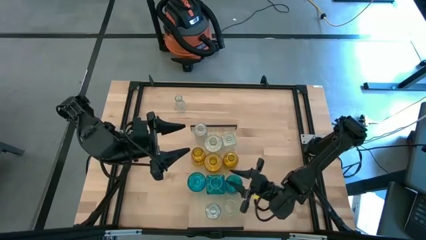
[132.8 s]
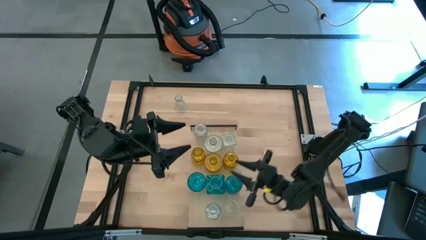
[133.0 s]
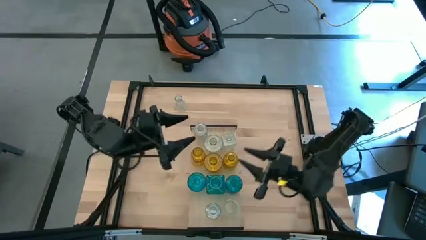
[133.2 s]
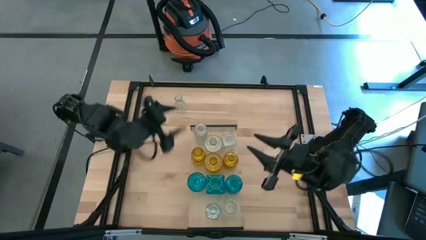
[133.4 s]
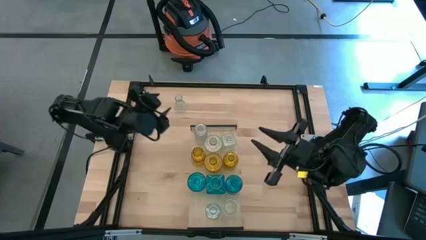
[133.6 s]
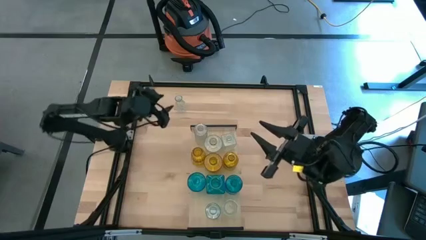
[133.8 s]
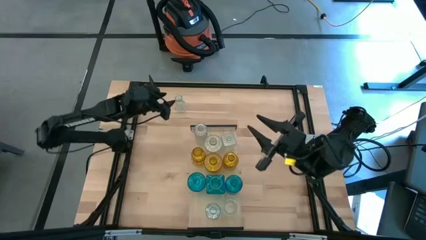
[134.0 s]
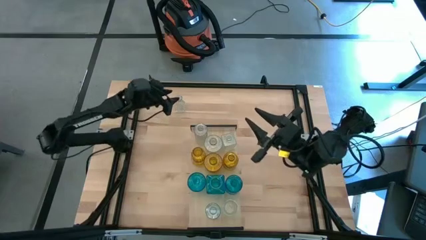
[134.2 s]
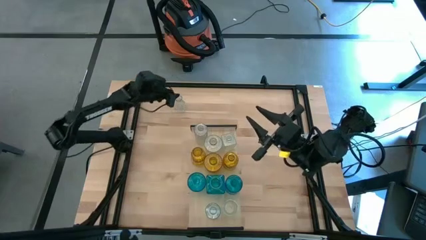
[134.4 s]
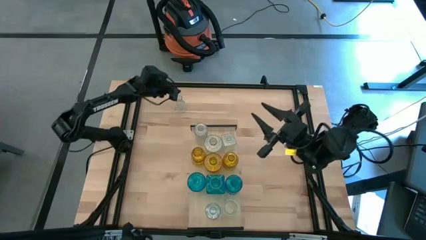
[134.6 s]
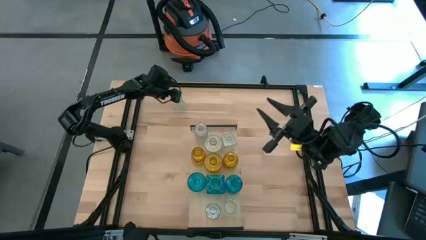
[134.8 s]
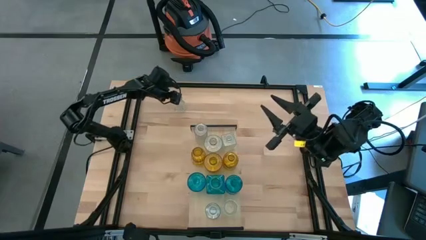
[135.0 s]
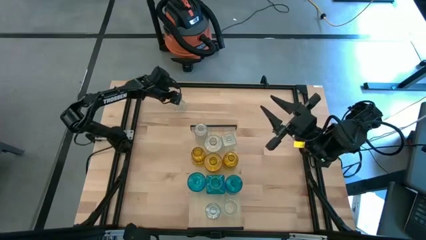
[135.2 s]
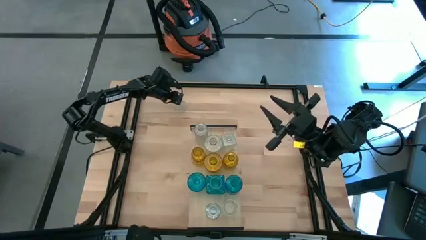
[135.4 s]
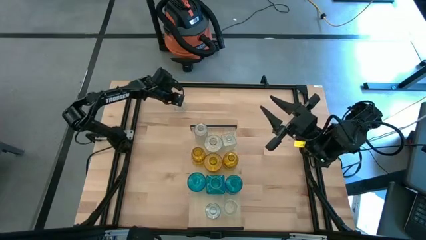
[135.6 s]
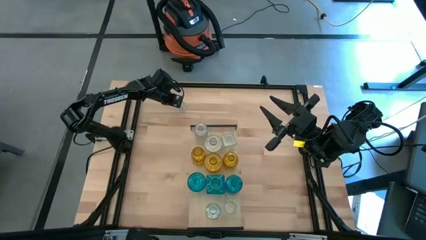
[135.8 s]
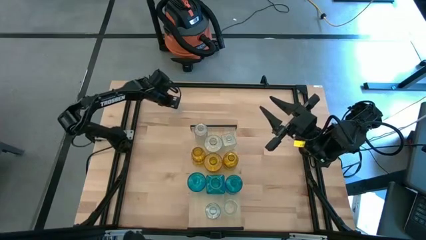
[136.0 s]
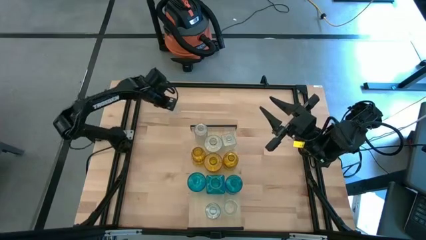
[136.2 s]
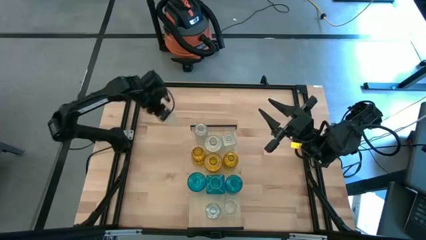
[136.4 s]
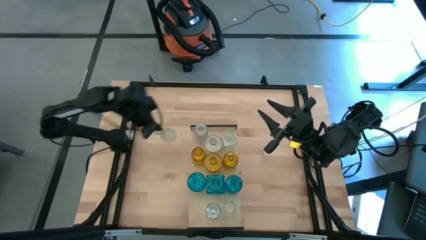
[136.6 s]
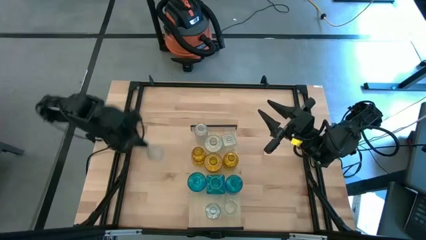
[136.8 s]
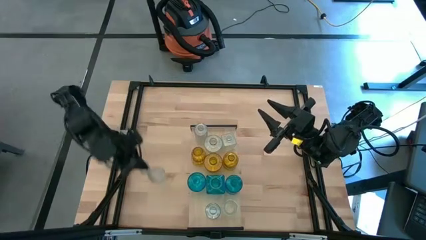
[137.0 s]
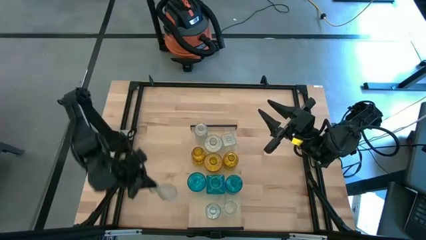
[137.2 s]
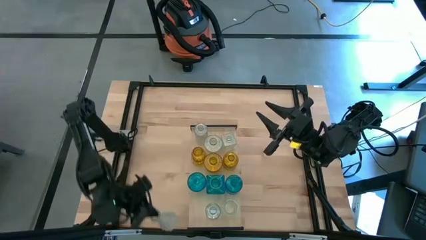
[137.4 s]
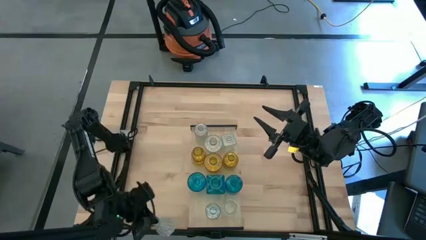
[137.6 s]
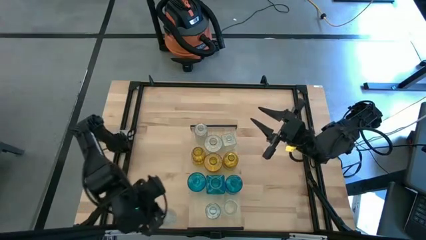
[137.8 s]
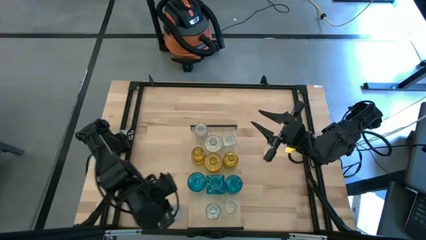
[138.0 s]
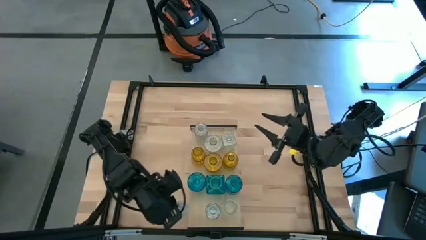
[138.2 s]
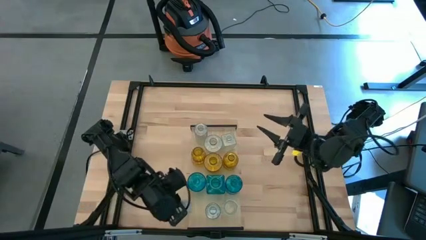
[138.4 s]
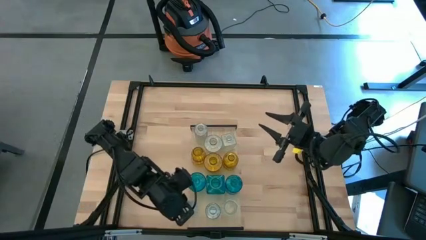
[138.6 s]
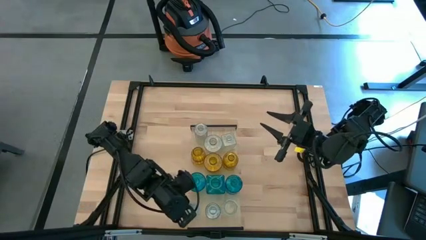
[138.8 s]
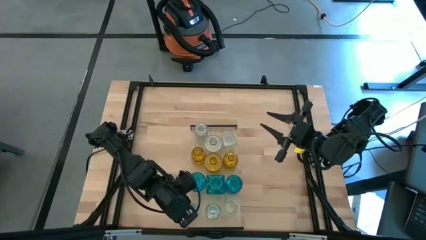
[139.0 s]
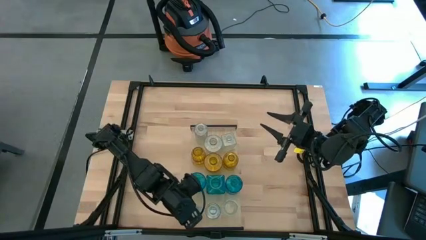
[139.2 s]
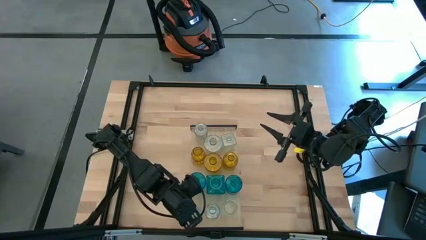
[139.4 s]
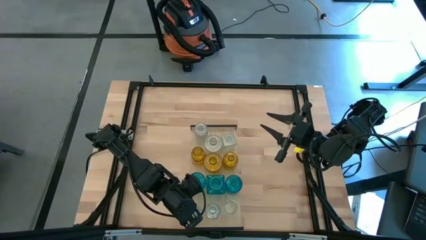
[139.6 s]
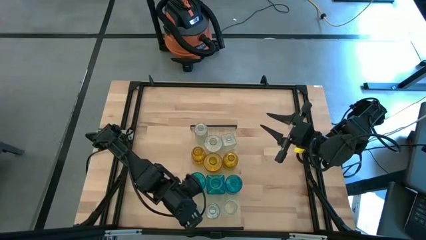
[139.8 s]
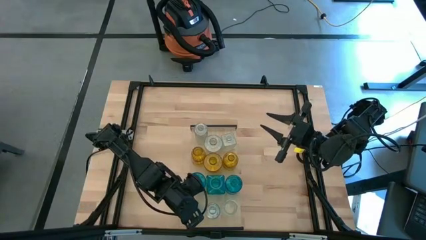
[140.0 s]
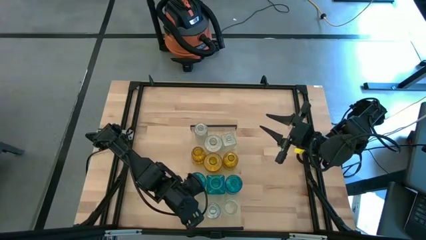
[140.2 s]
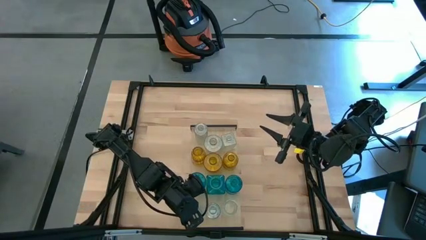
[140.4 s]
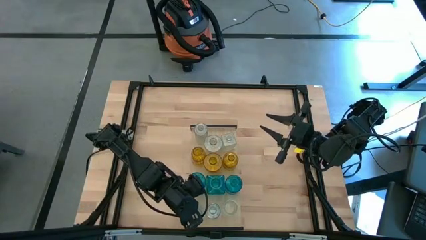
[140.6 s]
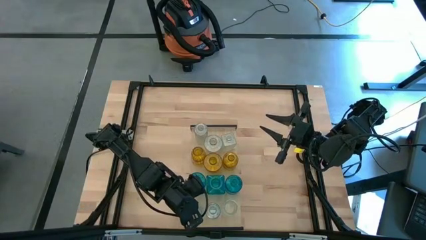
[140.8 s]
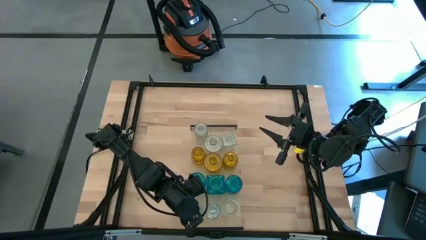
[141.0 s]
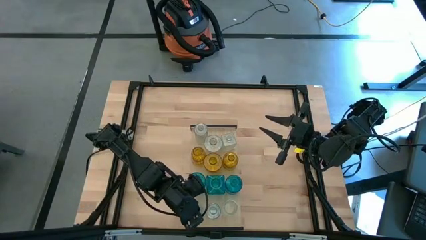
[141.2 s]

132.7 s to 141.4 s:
Task: sort vases onto shelf
Put the transparent vase on the shelf aligned with the other transparent vases

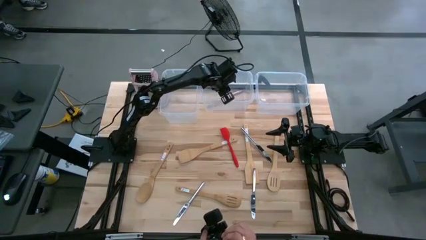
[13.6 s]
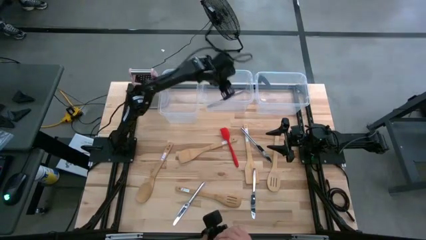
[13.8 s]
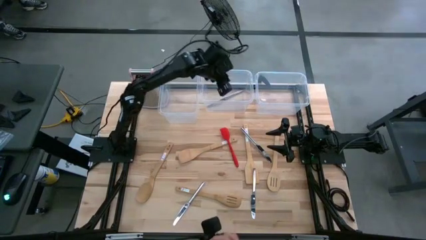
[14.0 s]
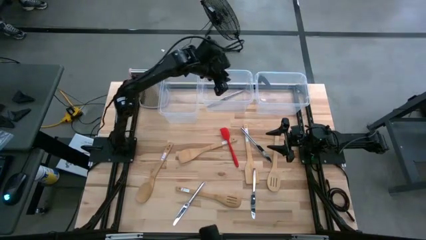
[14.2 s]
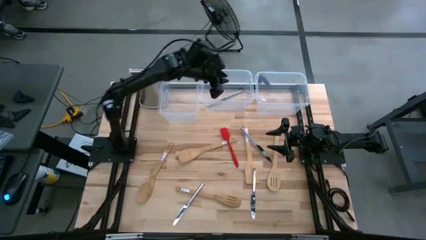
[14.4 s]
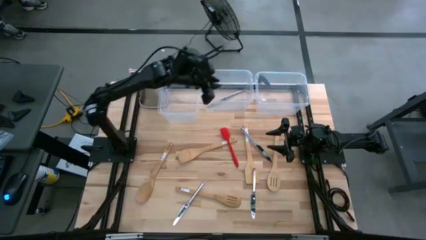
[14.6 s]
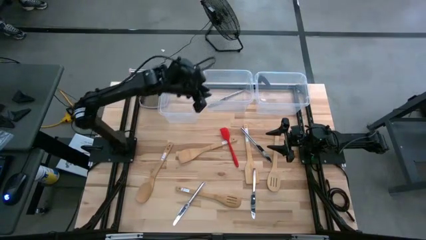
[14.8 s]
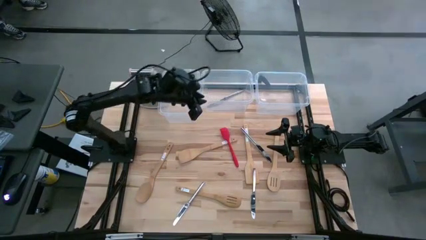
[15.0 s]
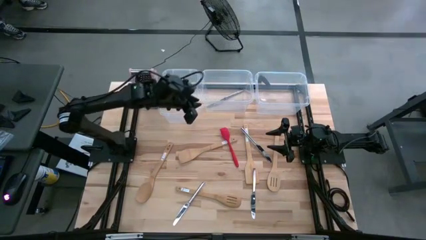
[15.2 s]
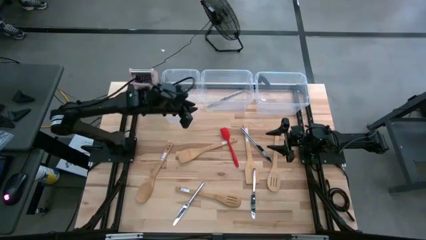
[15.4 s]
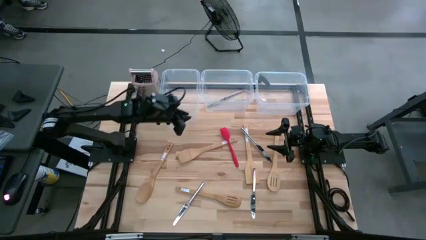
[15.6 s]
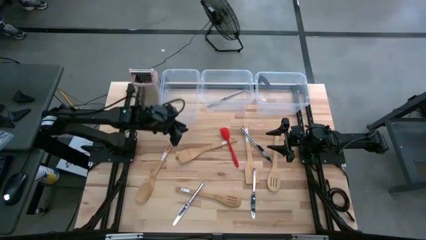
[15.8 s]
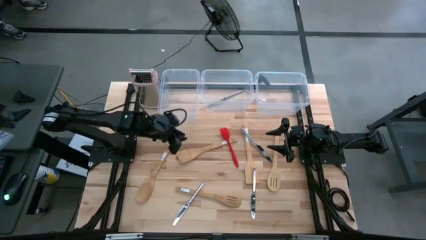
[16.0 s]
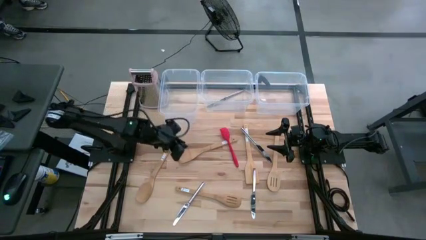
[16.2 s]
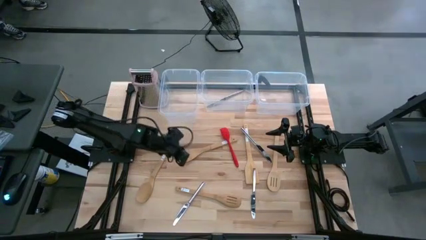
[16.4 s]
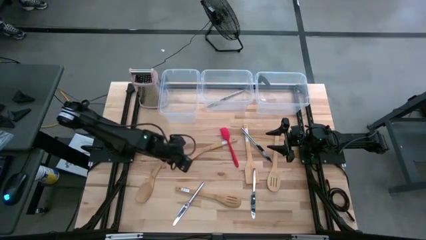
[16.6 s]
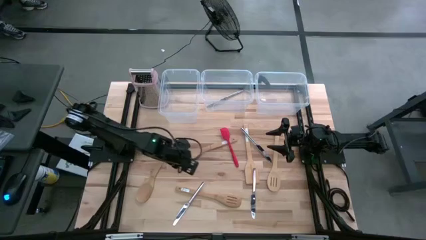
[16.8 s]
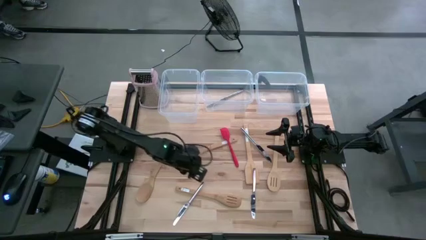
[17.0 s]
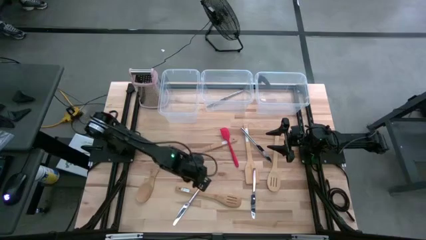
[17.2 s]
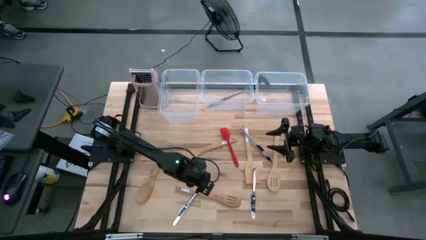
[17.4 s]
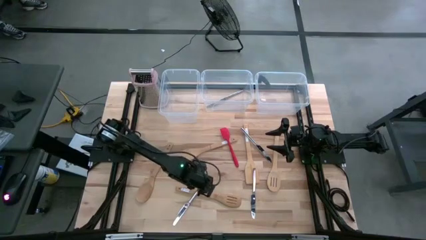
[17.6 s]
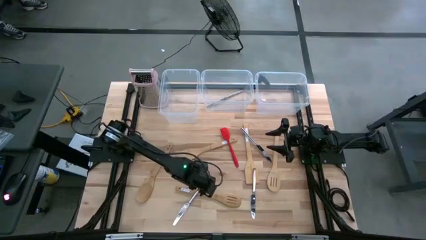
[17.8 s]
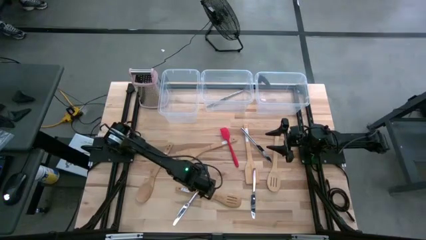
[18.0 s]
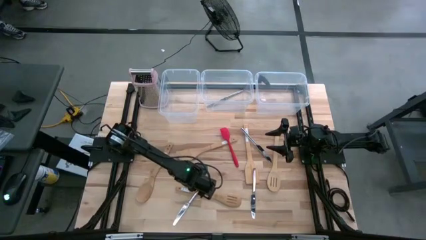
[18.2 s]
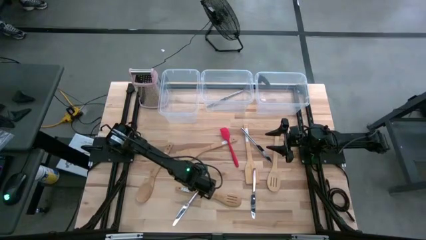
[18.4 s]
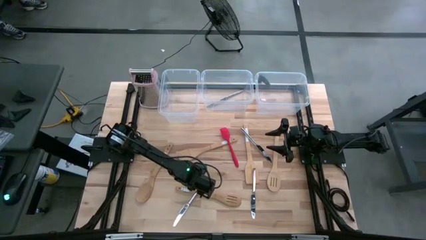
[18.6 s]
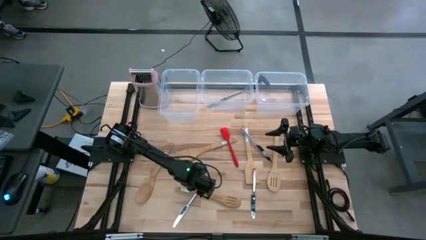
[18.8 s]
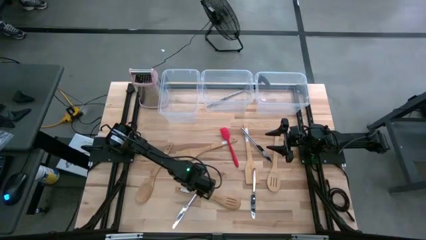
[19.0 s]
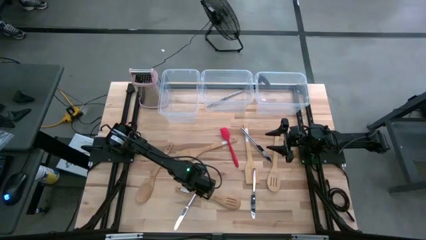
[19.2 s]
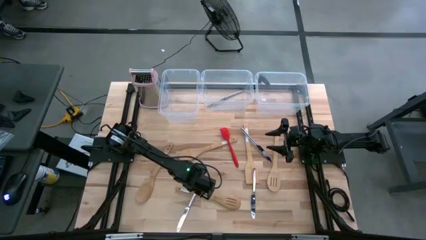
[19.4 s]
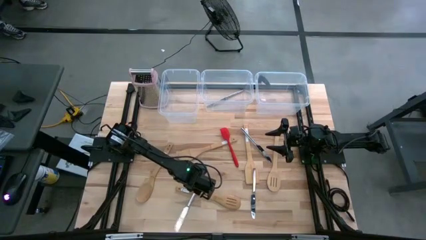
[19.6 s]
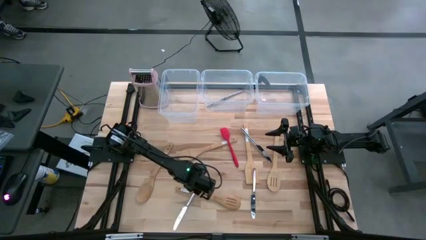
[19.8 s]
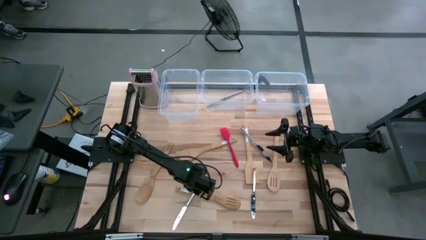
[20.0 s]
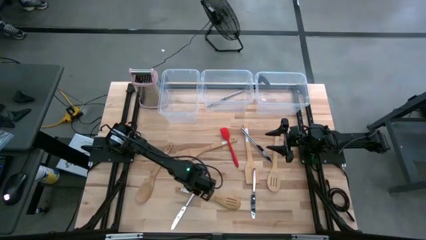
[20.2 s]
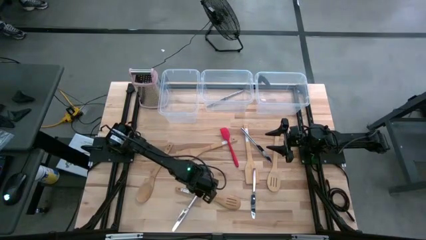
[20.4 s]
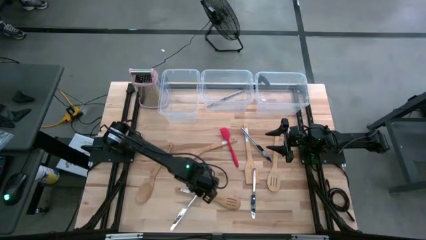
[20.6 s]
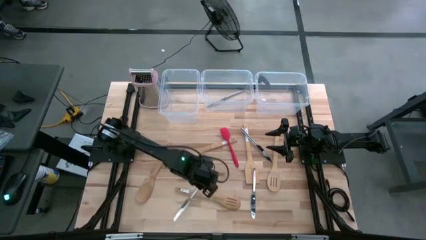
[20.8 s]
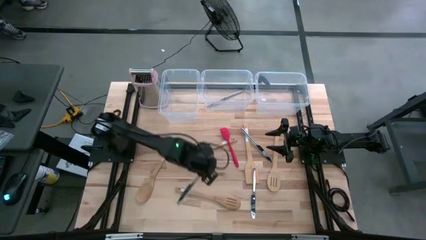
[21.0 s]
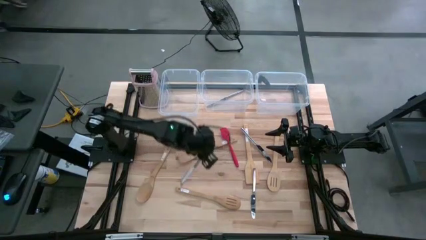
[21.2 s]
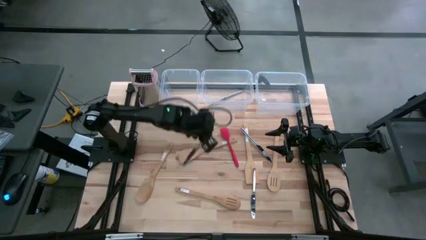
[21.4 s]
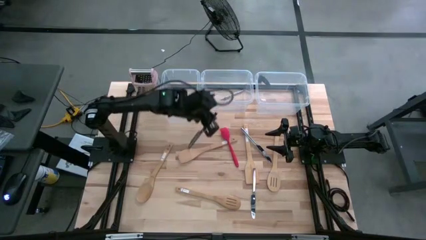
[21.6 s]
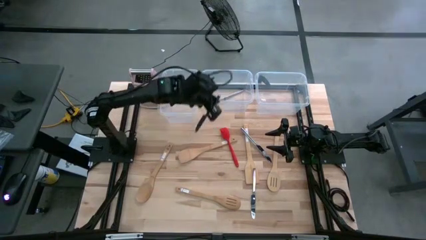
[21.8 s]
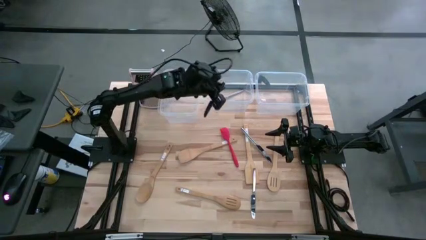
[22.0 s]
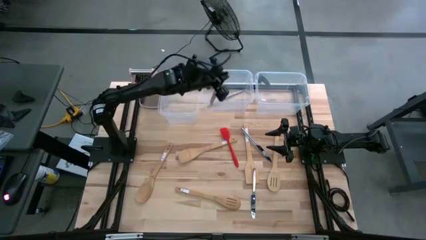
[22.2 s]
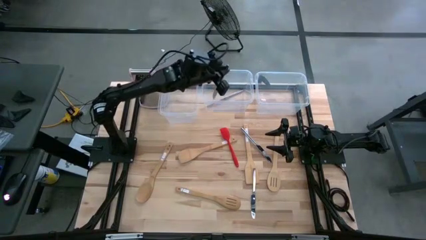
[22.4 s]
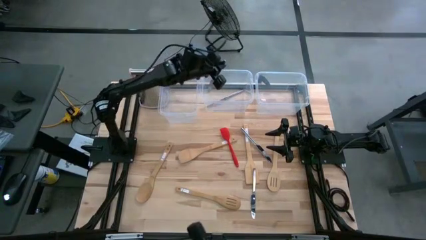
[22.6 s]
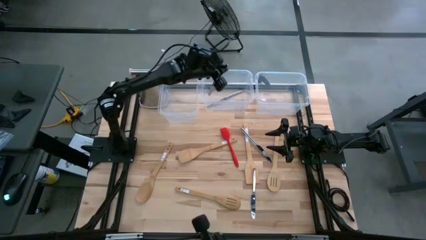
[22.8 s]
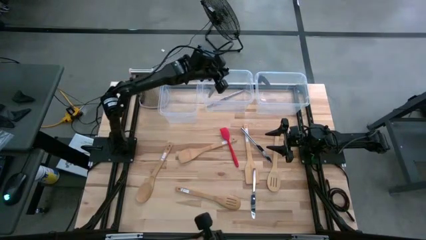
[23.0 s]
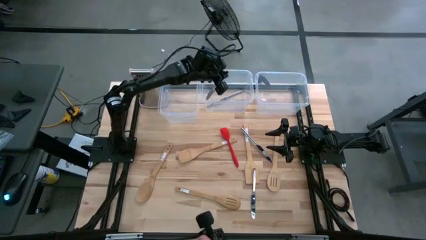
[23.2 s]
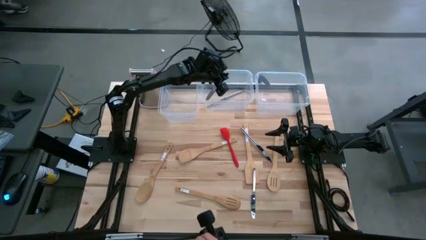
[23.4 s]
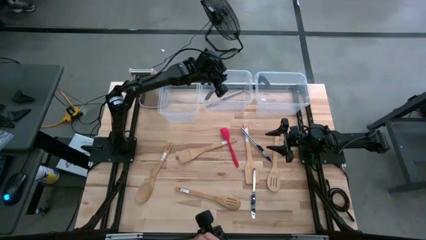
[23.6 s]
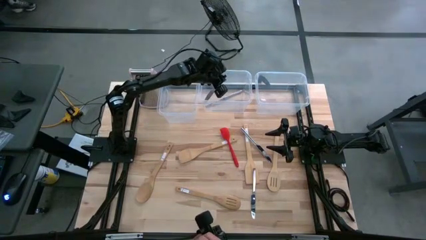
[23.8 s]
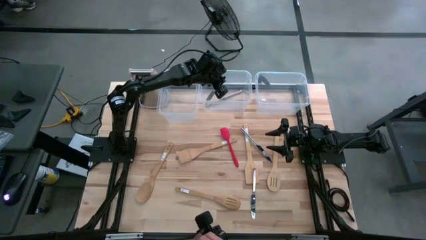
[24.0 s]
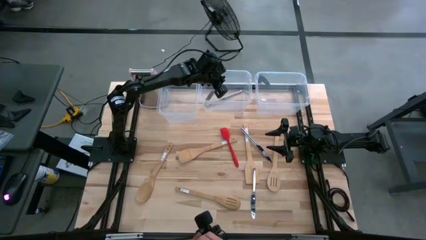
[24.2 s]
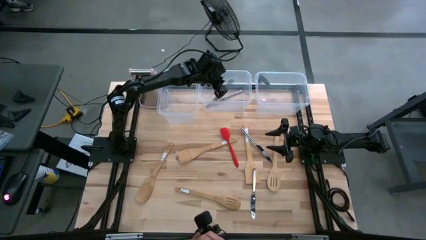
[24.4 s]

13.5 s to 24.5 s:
Task: Pick & Place Kitchen Items
Put the silver table knife into the middle transparent container
